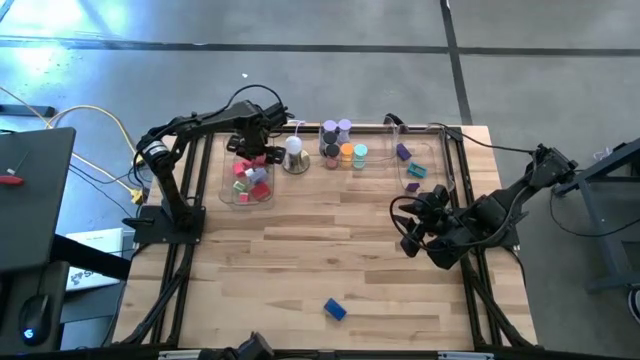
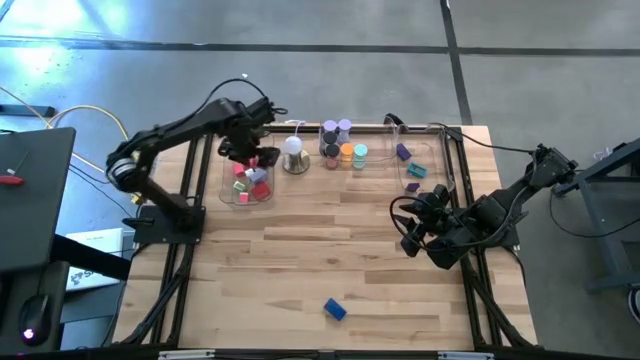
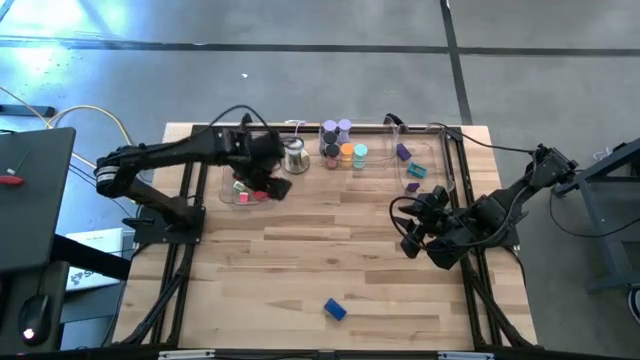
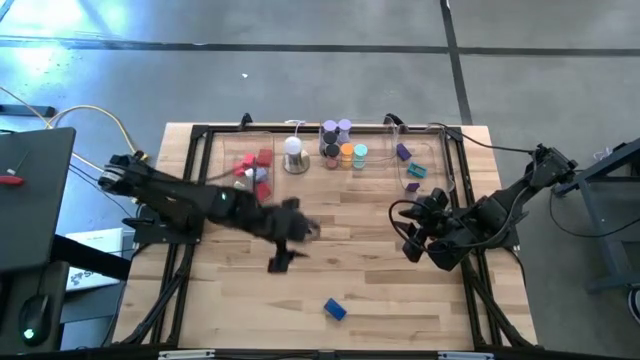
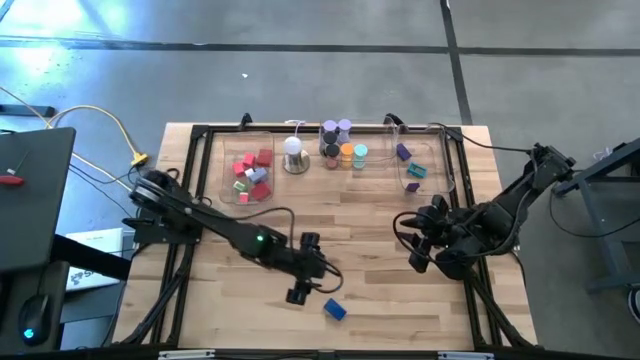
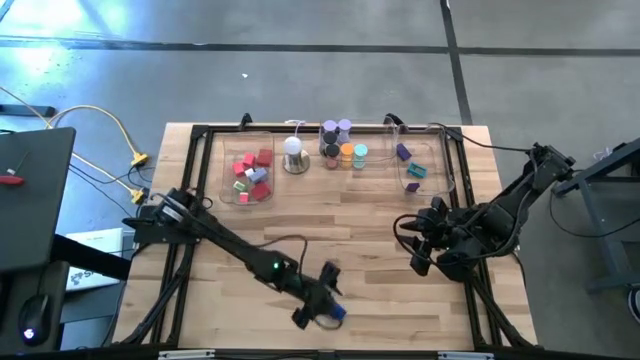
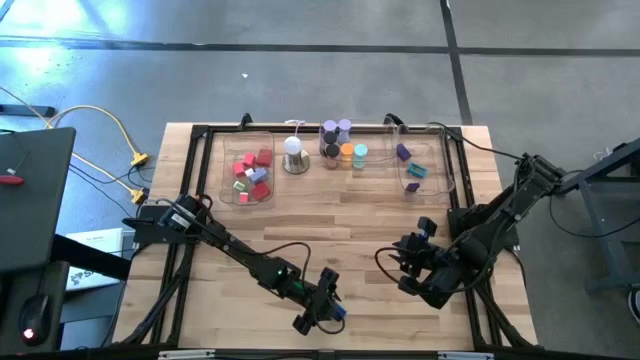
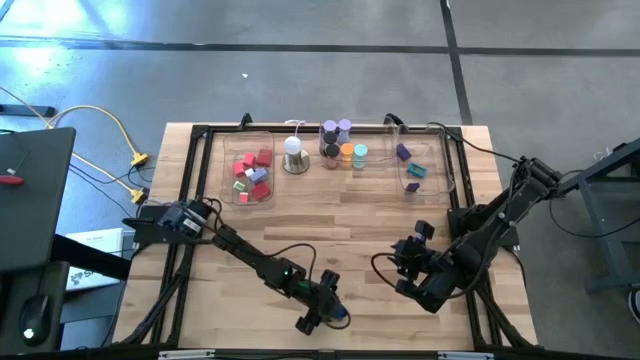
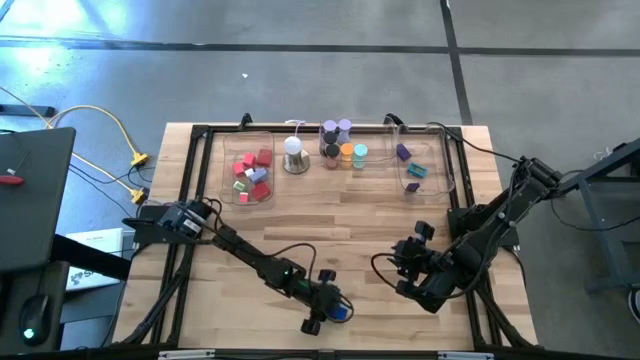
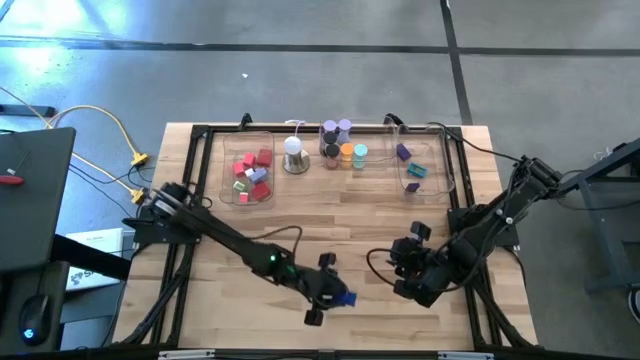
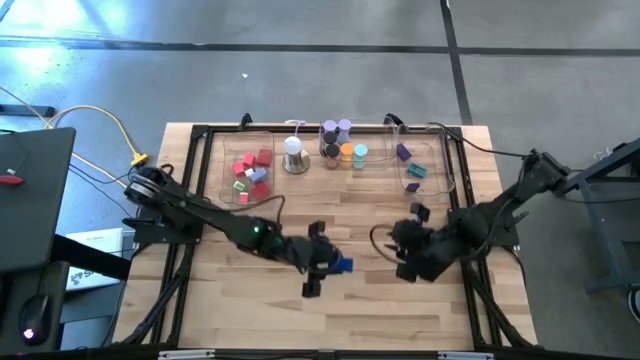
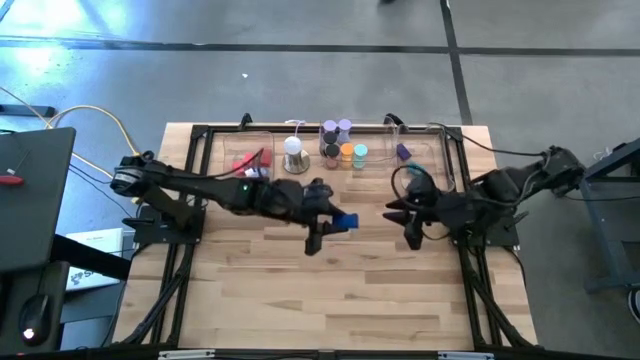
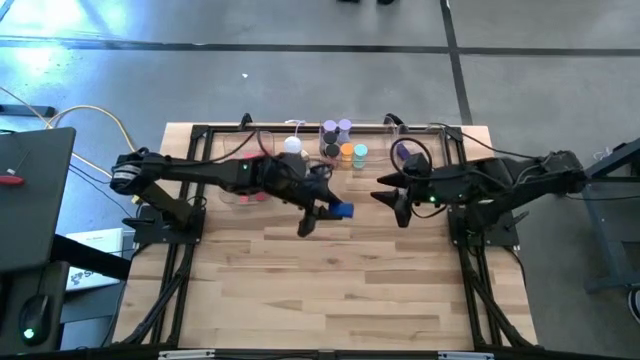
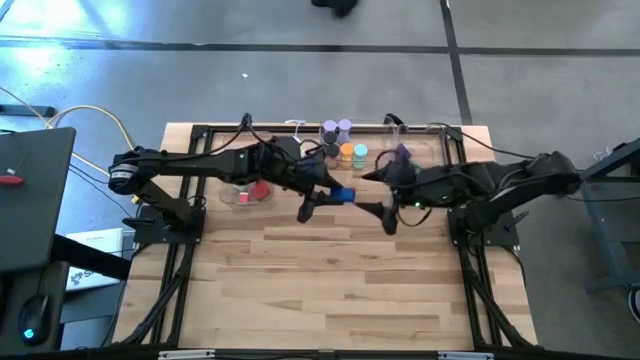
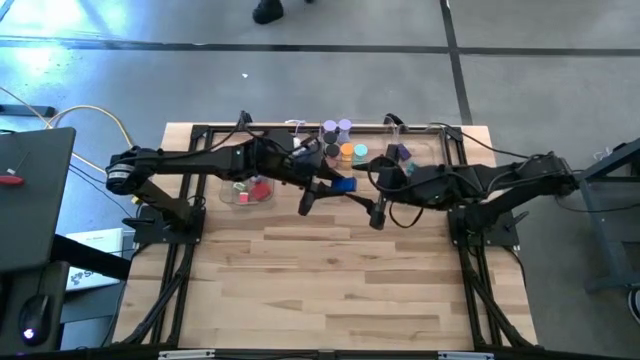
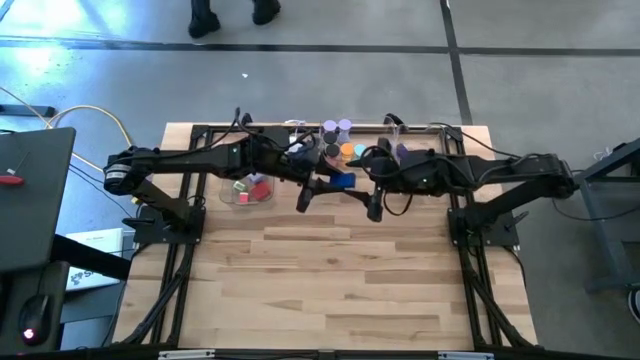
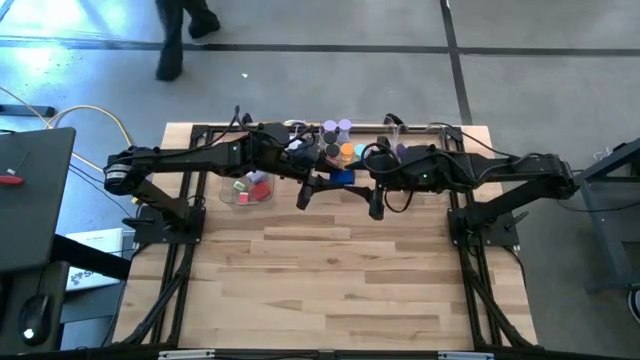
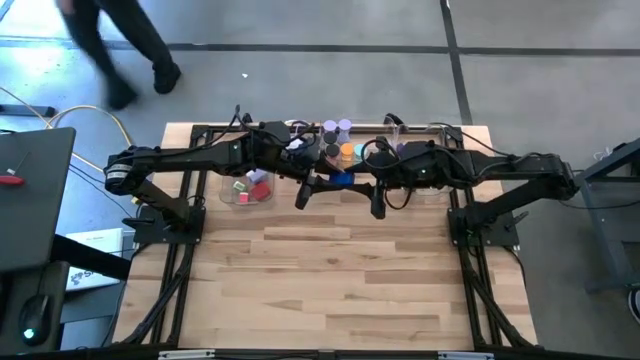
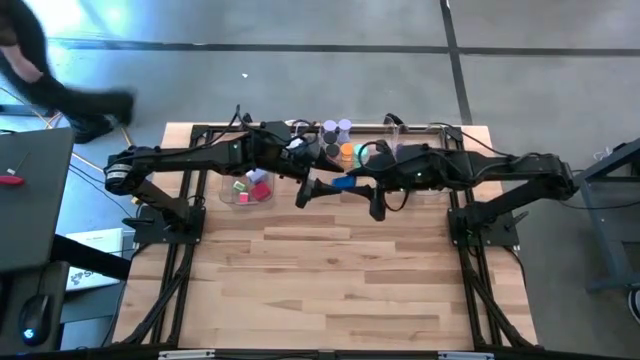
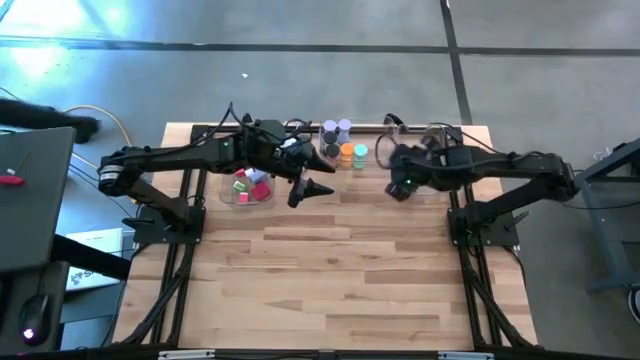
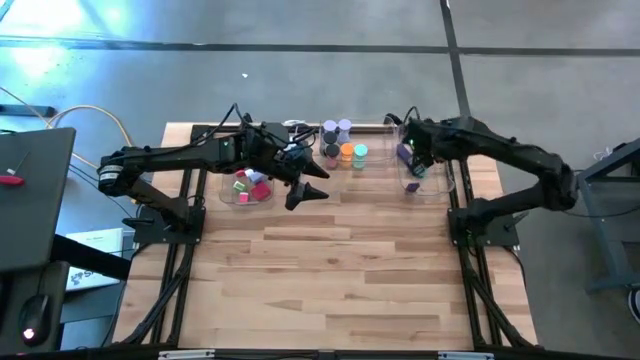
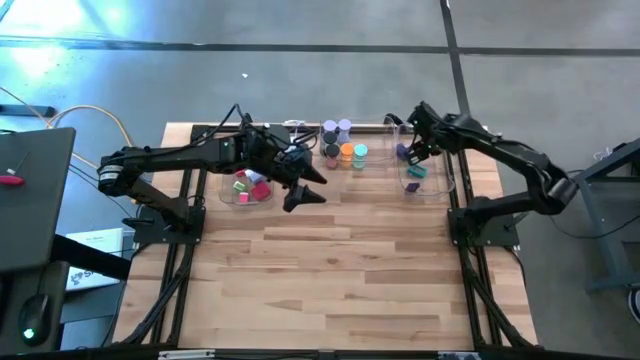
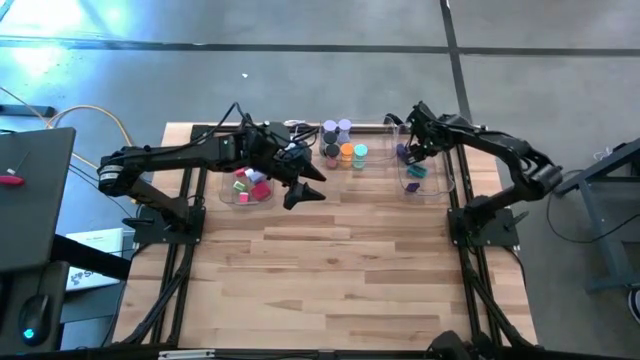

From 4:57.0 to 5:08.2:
Task: Pick & Place Office items
Put the blue digital clock into the right transparent bin

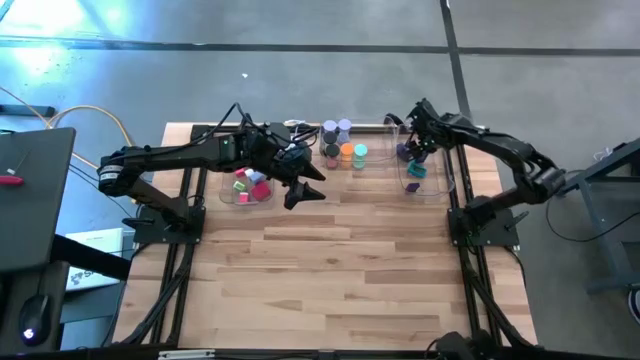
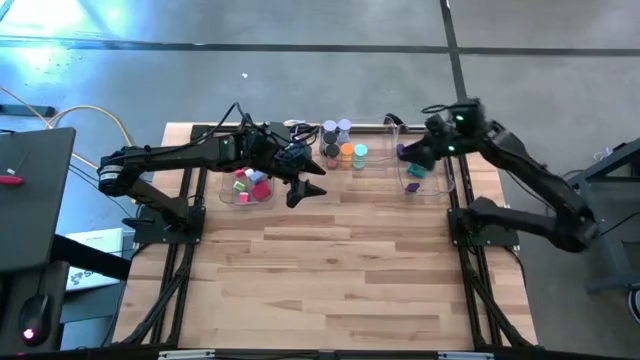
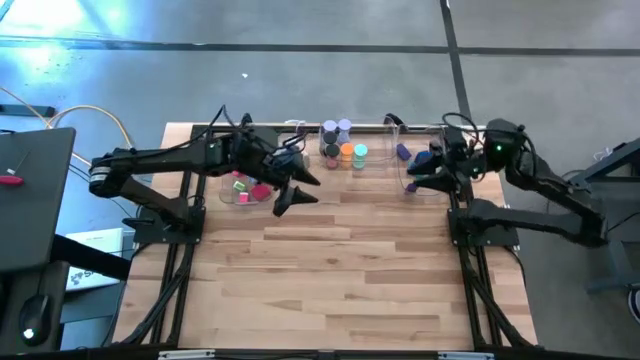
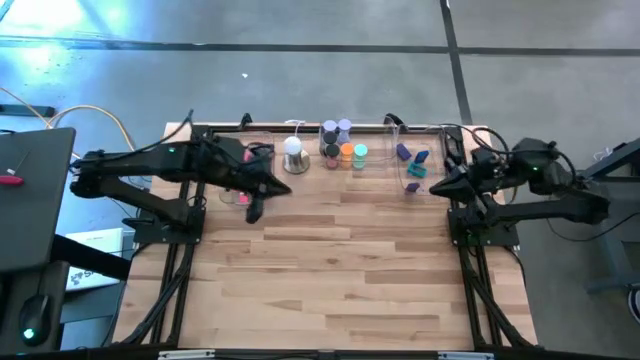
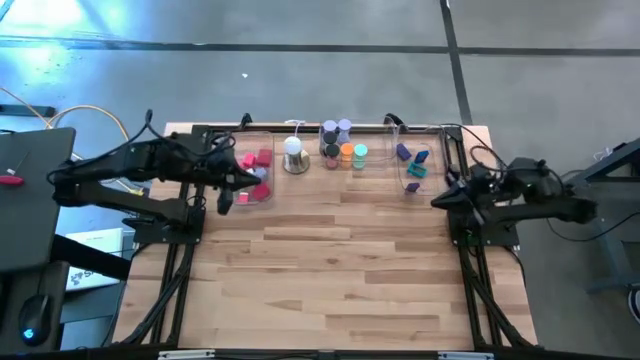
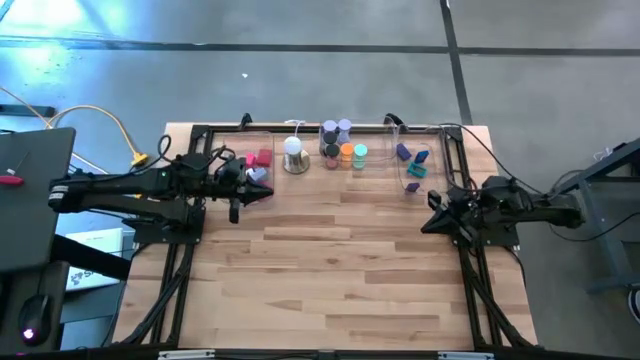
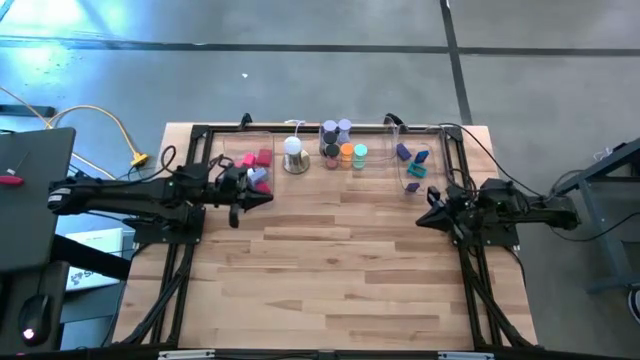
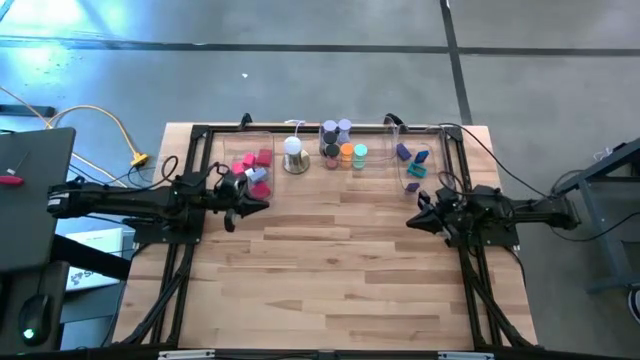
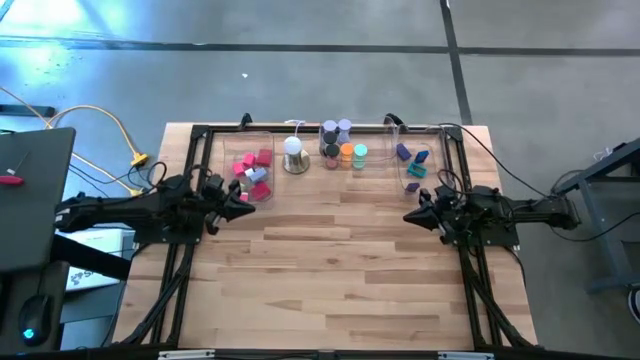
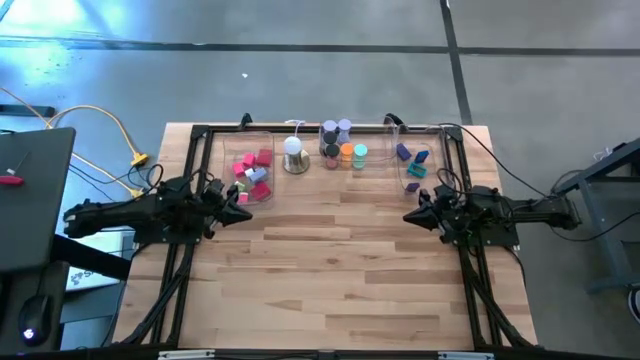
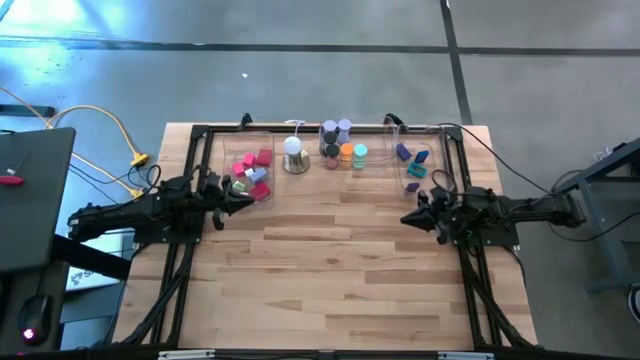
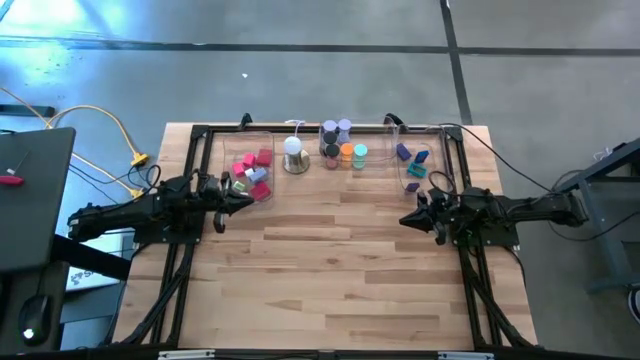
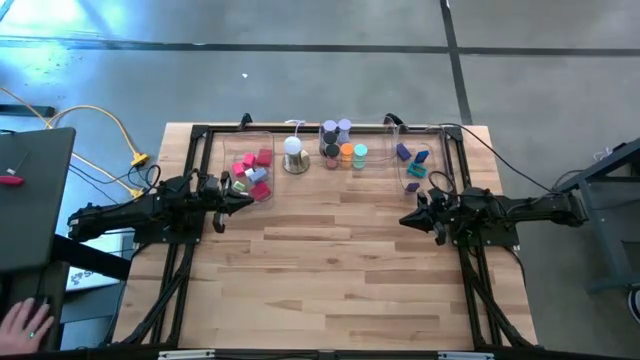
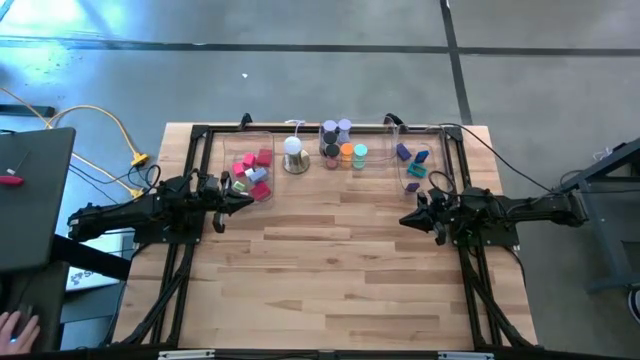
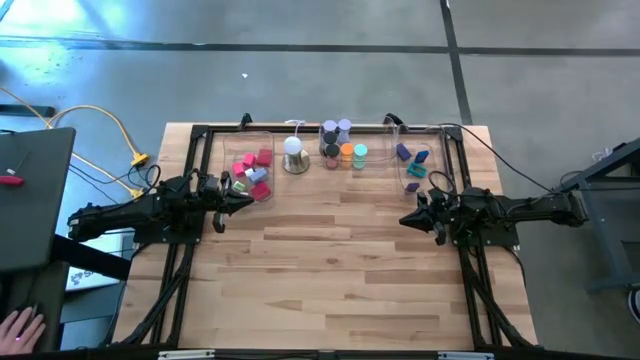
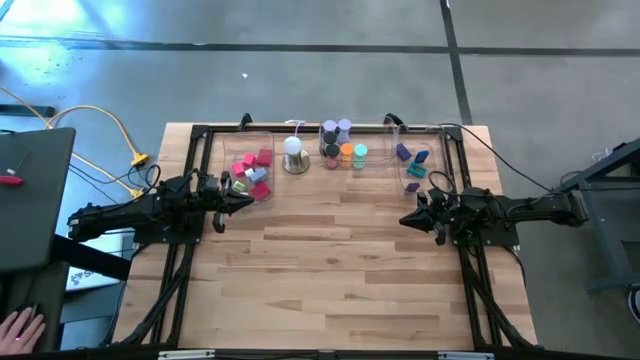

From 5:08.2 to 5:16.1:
Return to Home Position

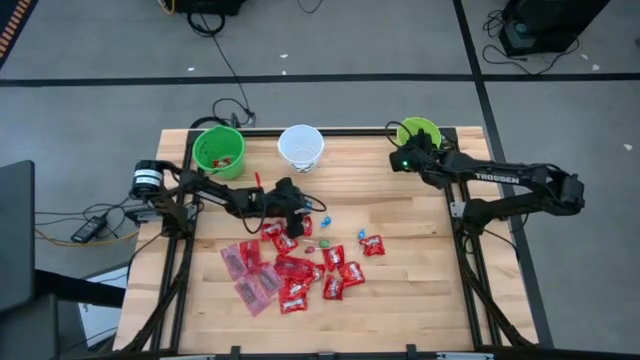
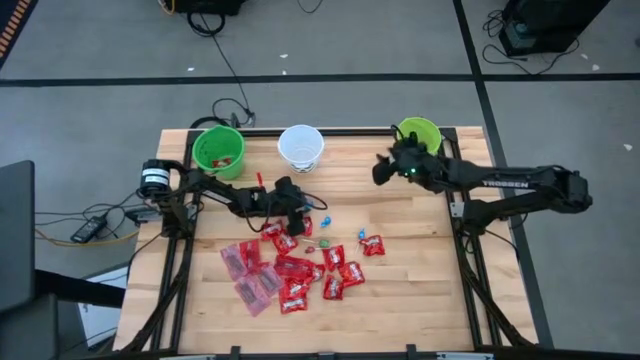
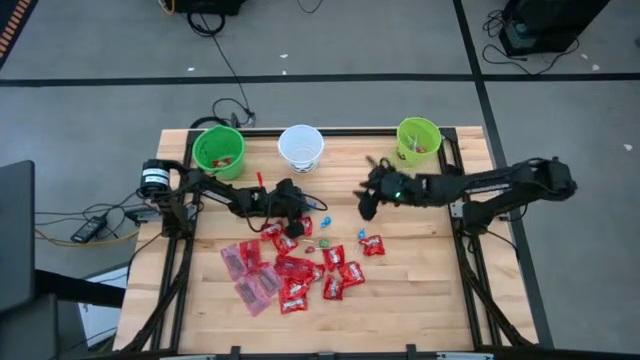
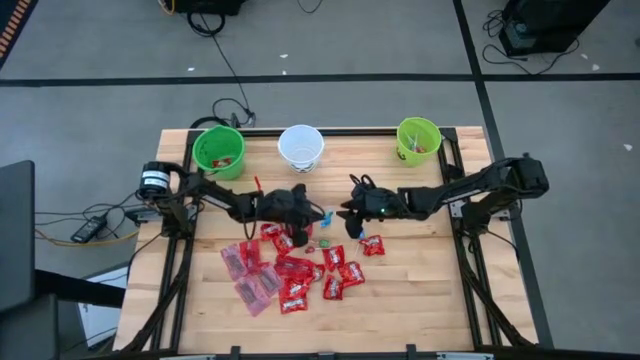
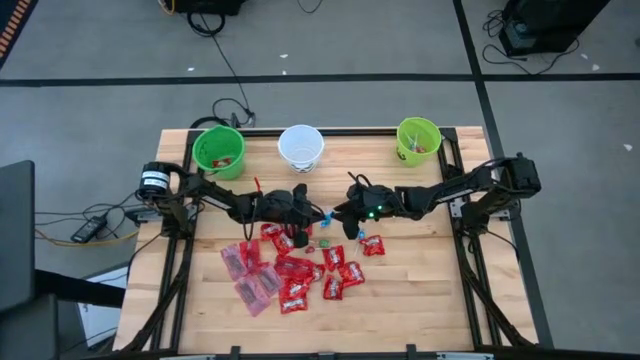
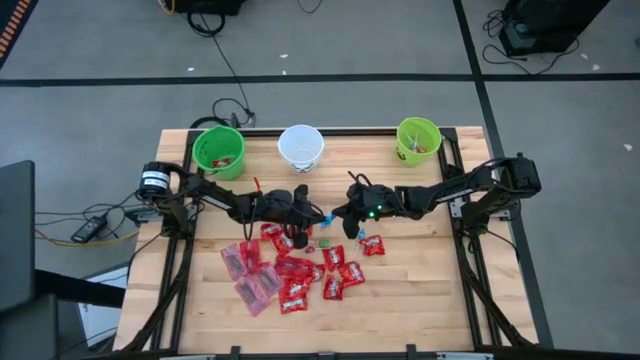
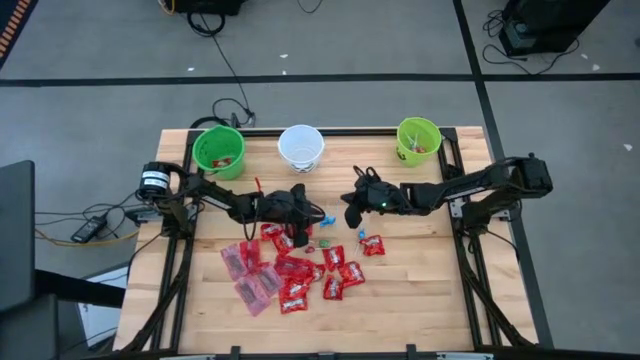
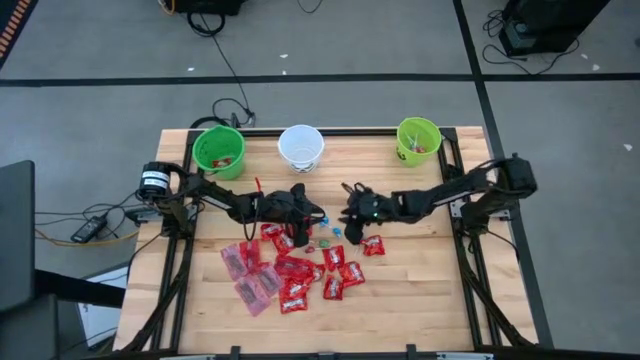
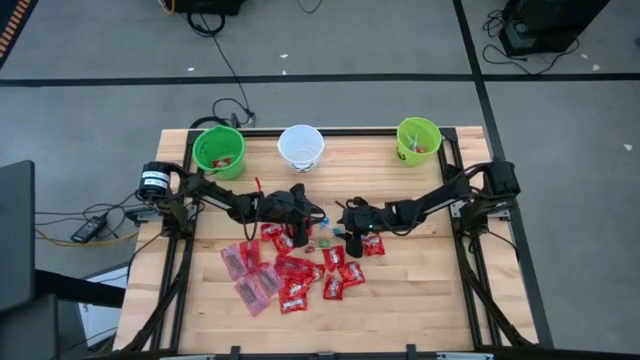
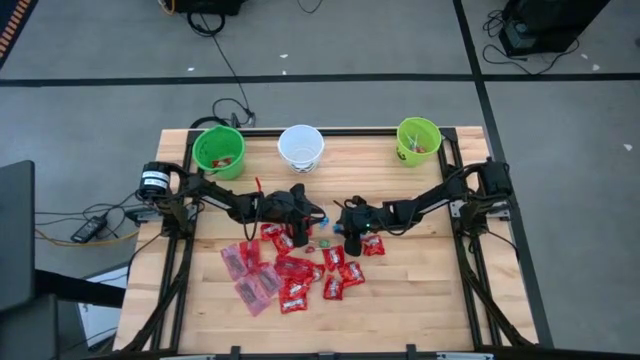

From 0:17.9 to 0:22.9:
Task: Sort candy by brand, put in halloween buckets
Put the blue lollipop into the light green bucket
